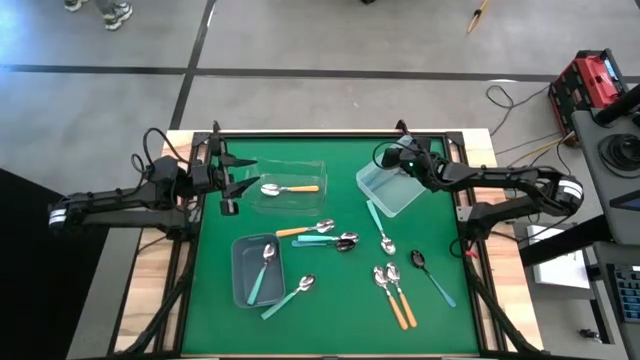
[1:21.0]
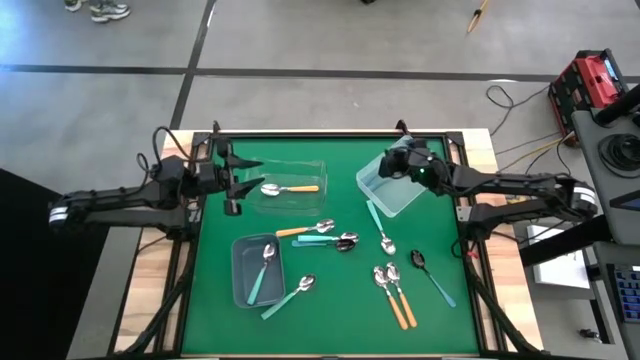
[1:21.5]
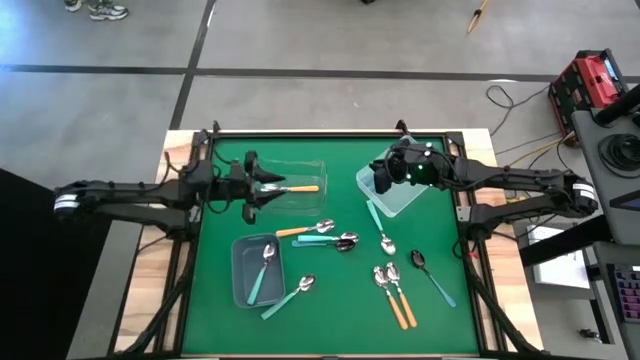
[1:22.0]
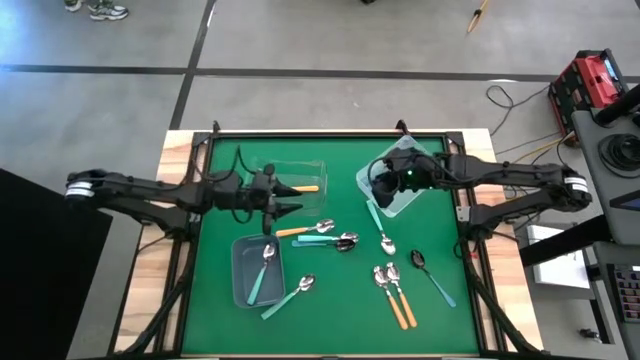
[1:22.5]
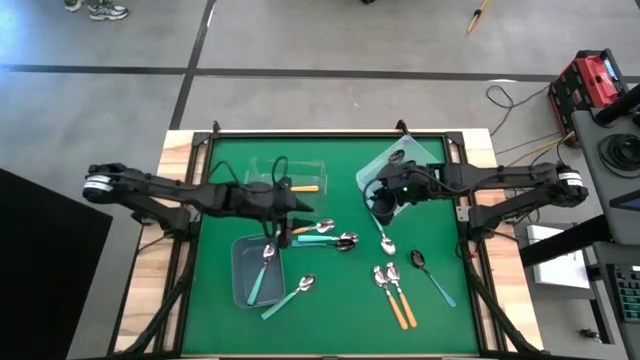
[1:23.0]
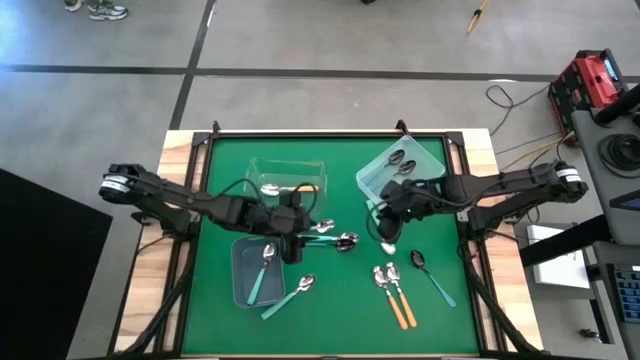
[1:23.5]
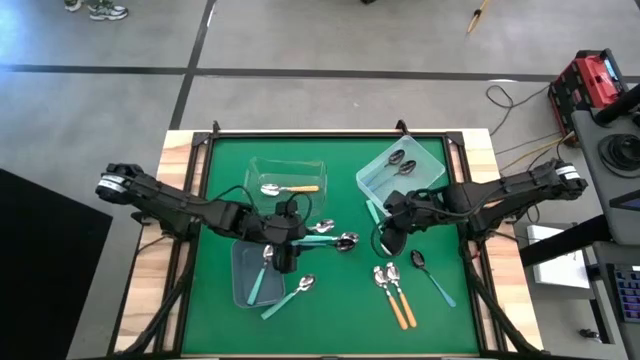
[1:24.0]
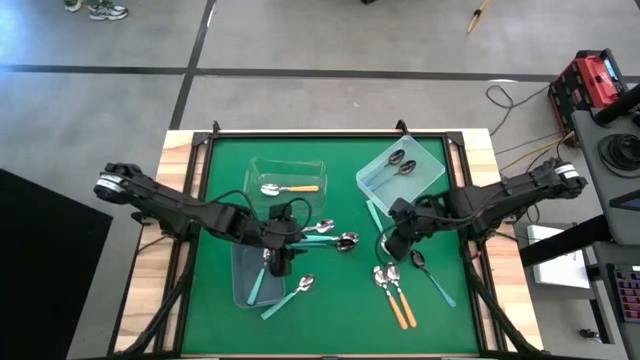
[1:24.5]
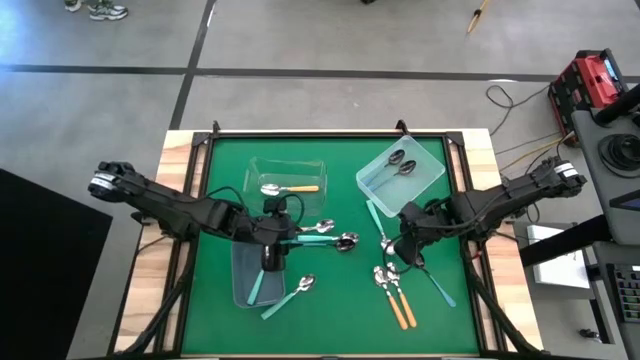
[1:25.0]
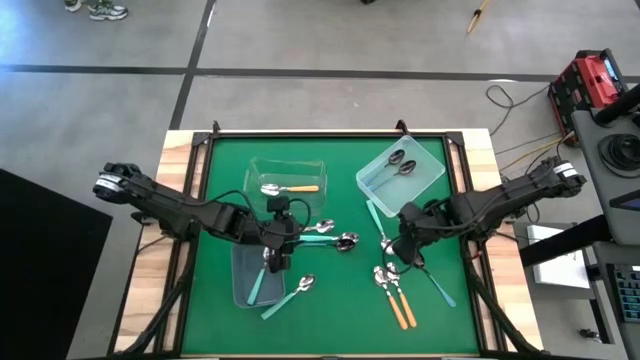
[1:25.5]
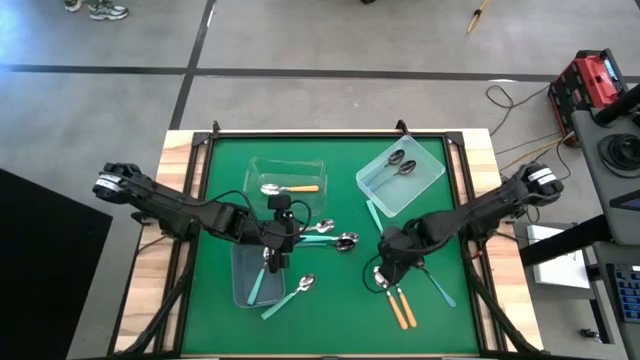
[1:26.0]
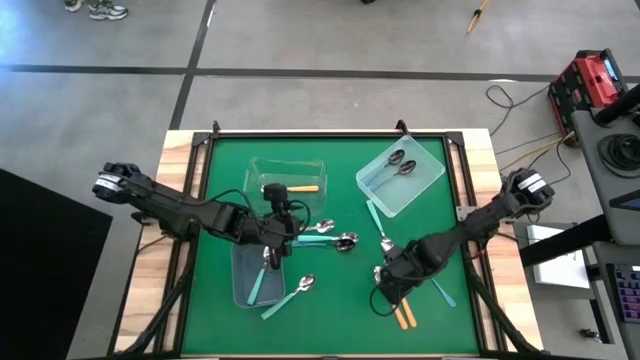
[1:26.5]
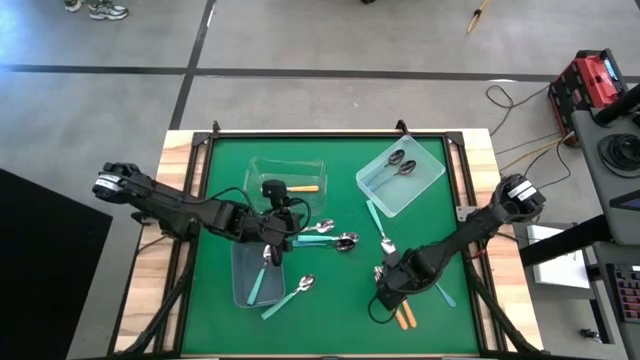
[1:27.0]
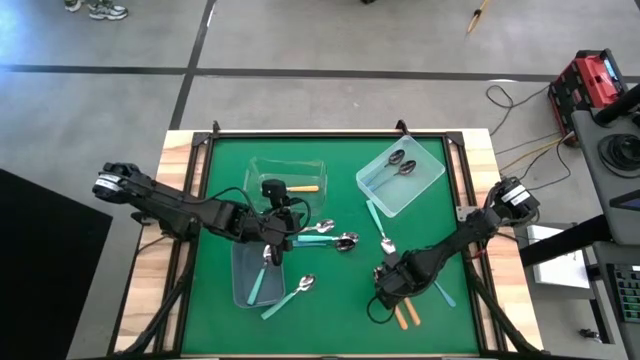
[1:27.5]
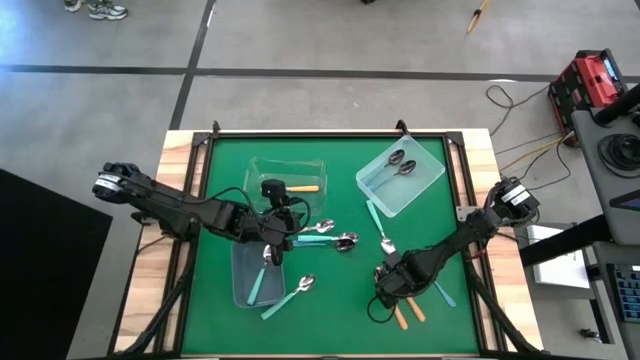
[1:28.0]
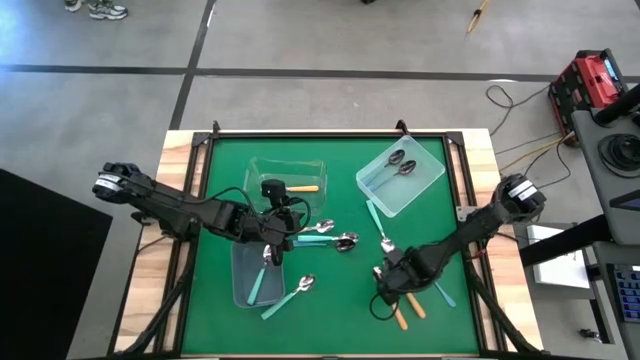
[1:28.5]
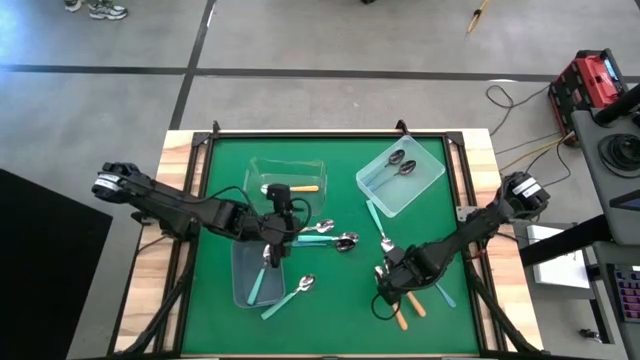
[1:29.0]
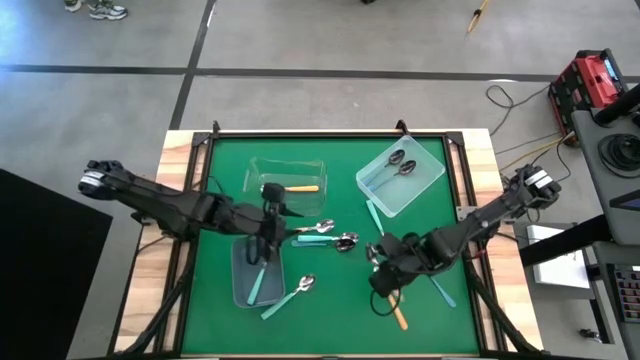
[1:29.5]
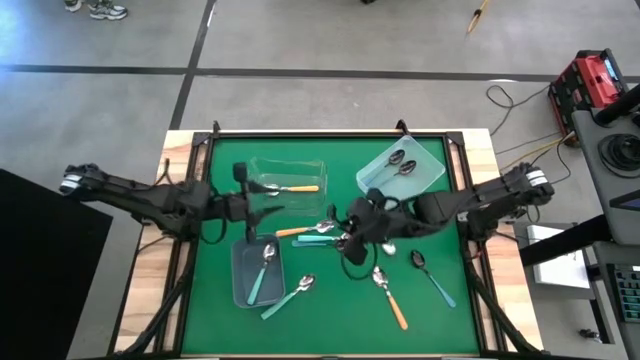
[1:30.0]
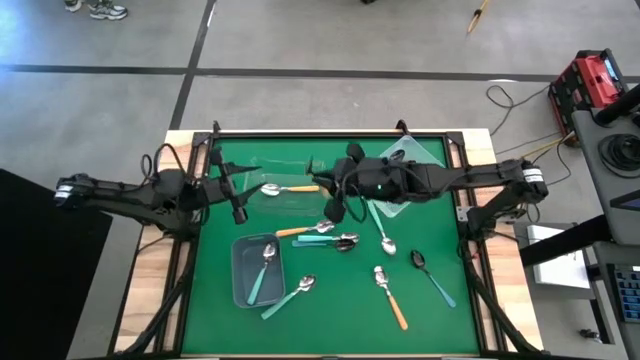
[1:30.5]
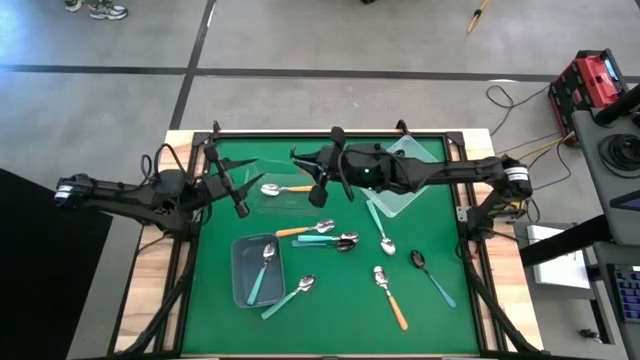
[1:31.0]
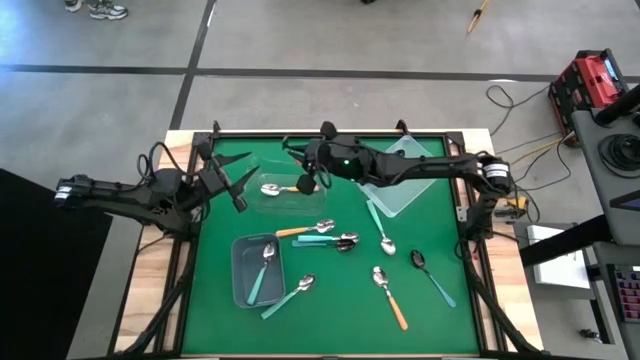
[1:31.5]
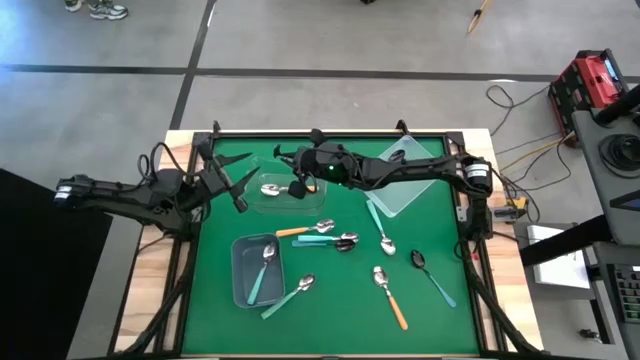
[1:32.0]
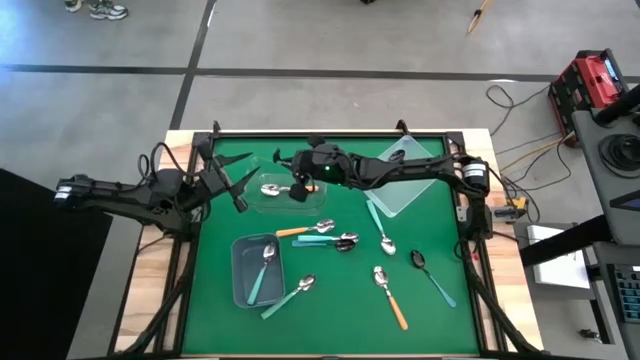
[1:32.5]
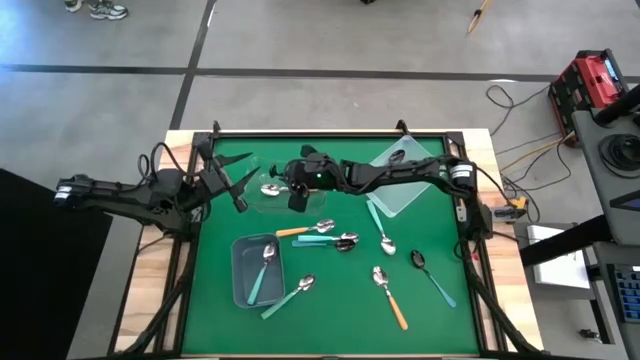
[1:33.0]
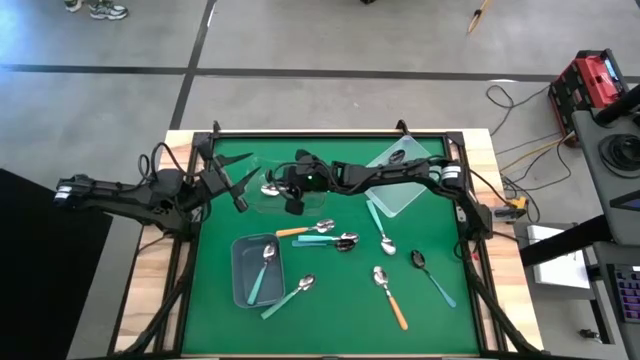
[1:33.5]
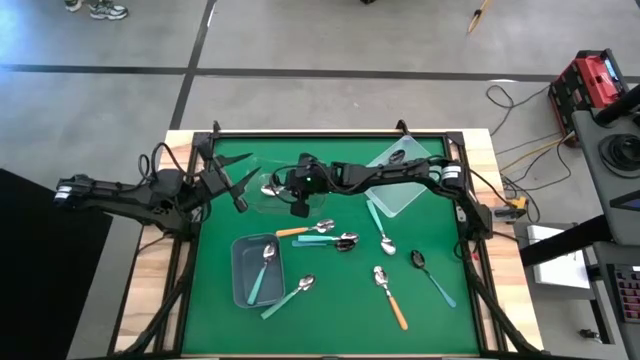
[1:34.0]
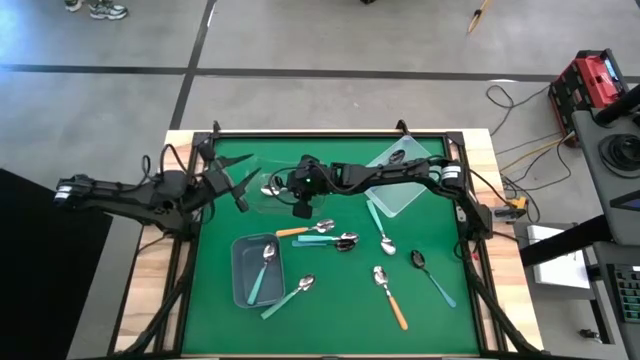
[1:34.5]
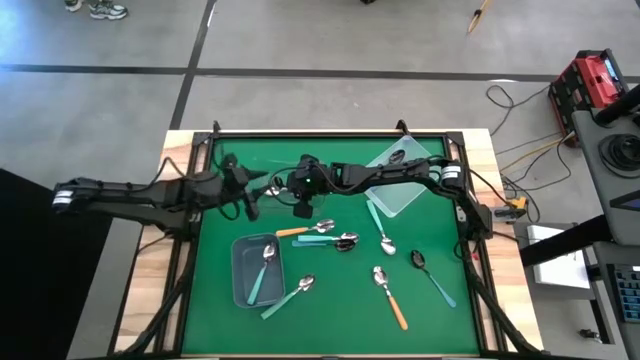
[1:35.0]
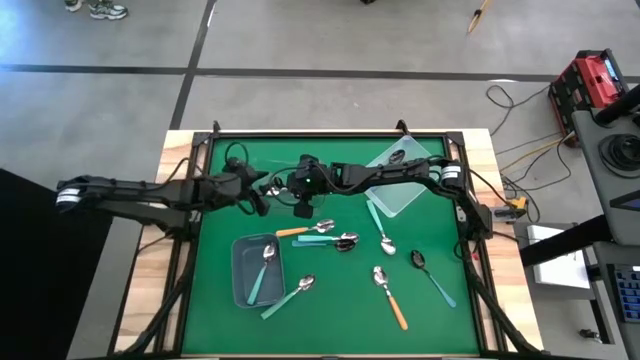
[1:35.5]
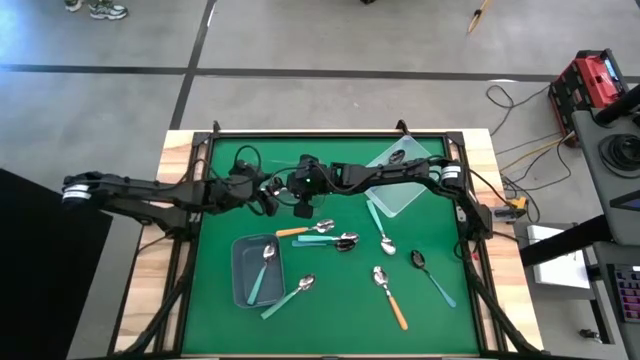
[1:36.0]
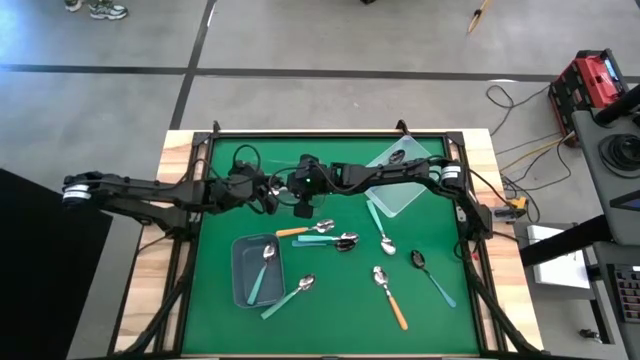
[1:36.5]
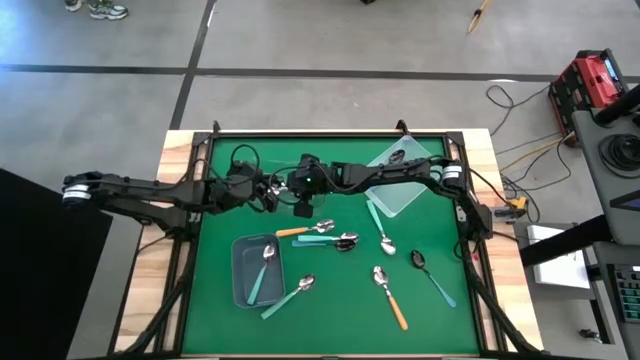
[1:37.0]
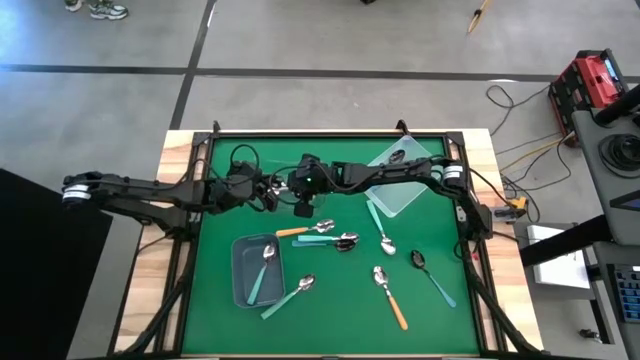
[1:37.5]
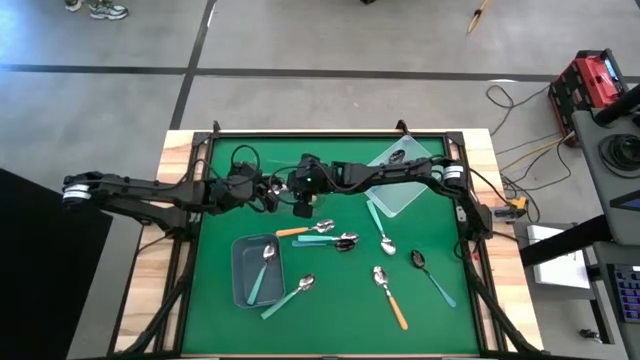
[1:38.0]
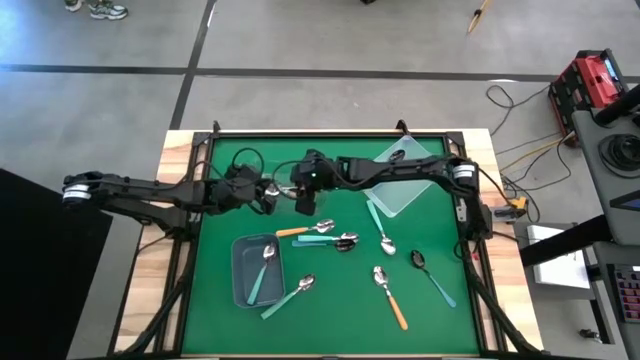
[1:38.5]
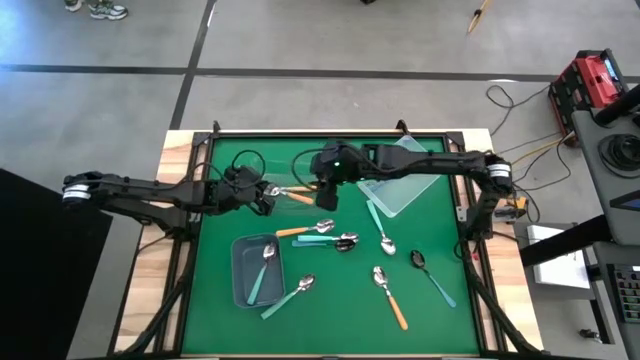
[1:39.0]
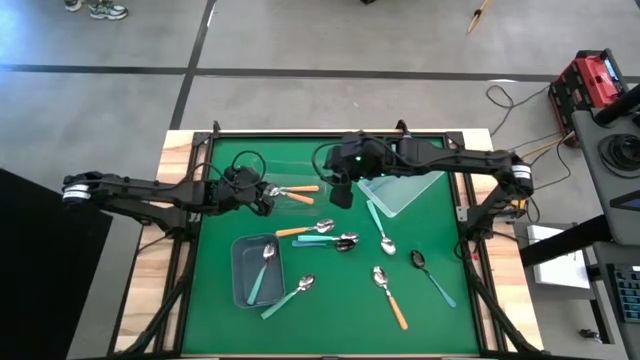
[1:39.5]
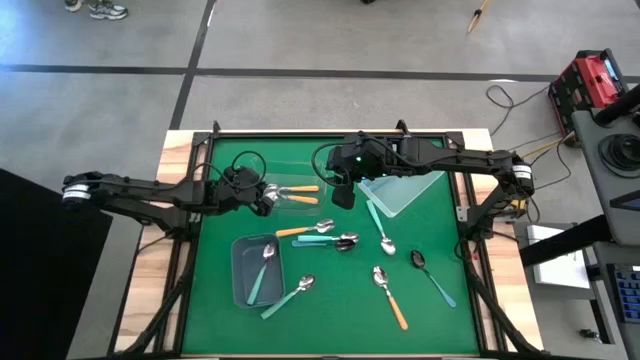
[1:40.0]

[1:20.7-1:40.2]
Task: Sort silverware by color (type)
Put the orange spoon into the transparent bin
